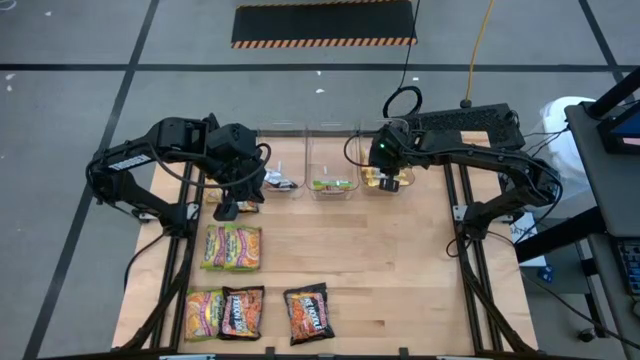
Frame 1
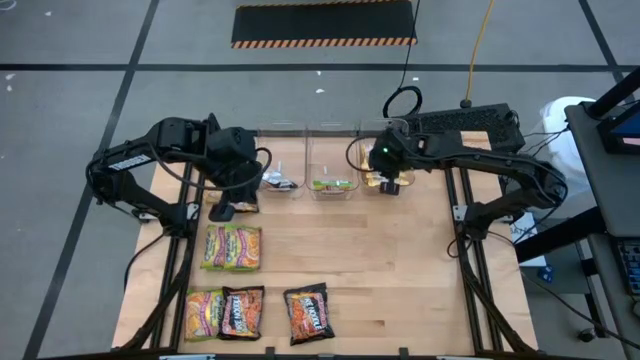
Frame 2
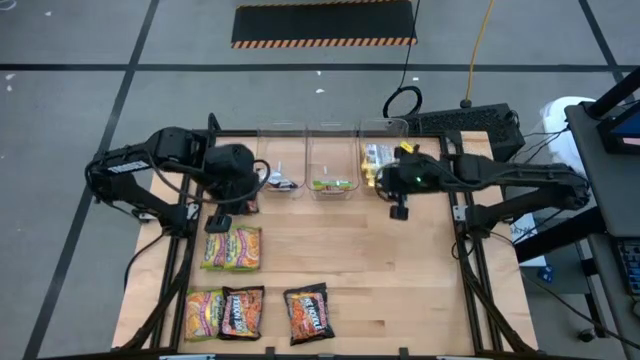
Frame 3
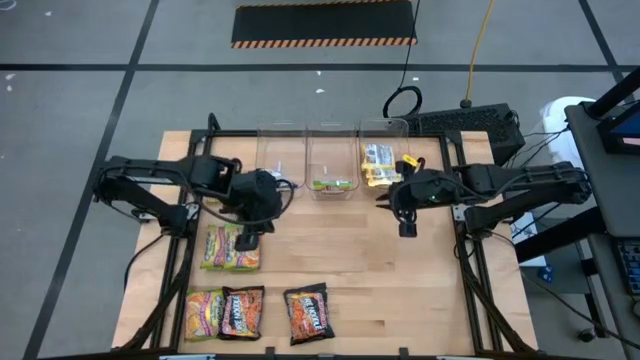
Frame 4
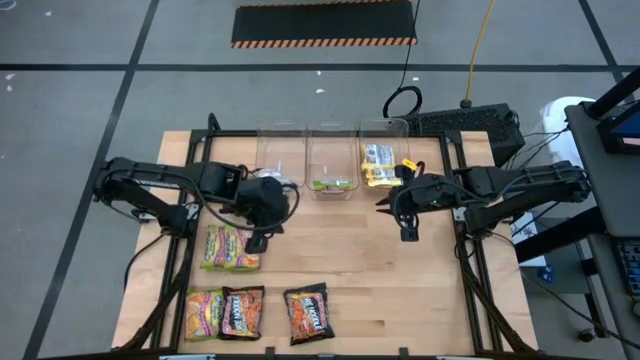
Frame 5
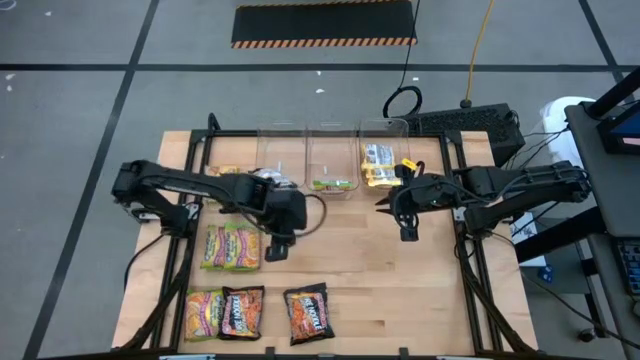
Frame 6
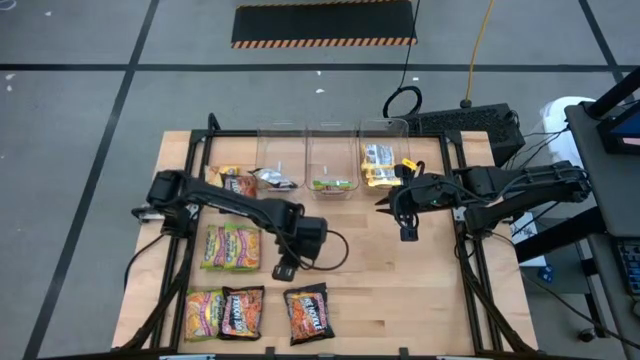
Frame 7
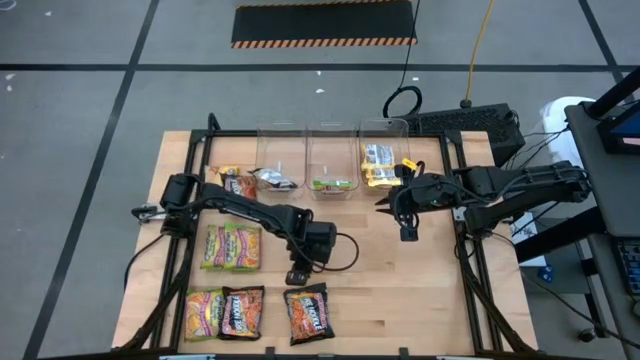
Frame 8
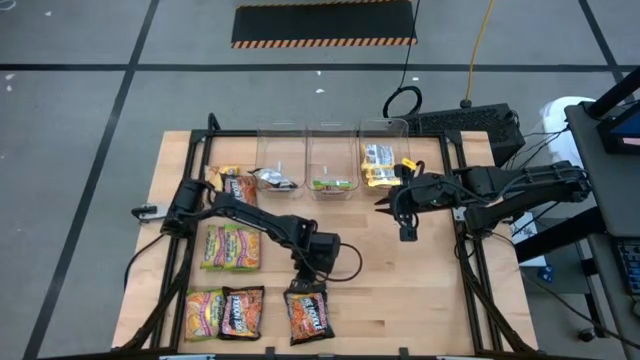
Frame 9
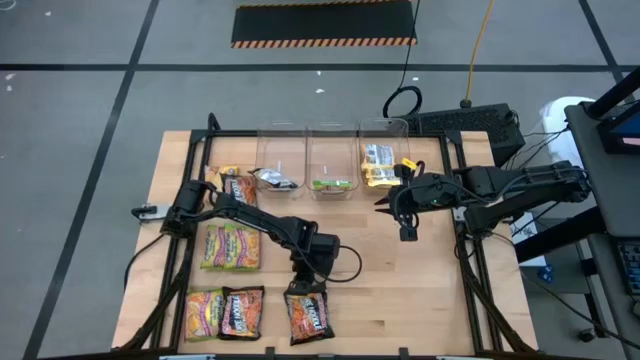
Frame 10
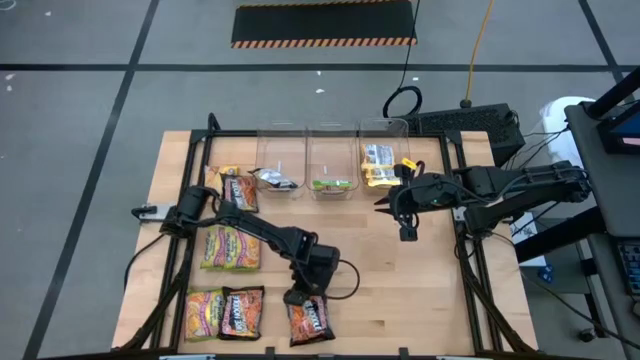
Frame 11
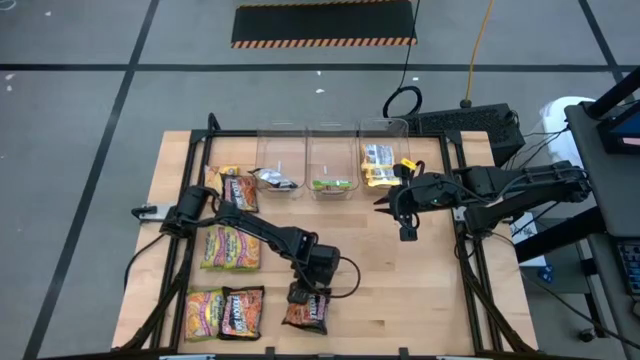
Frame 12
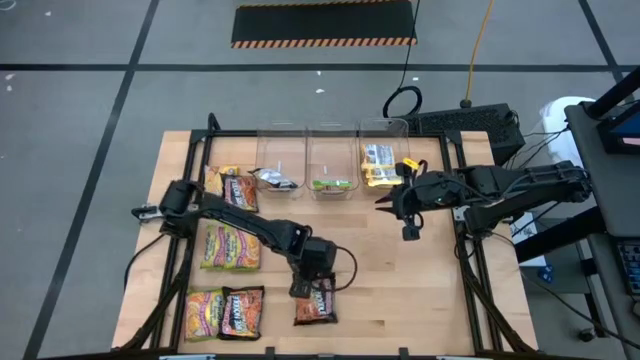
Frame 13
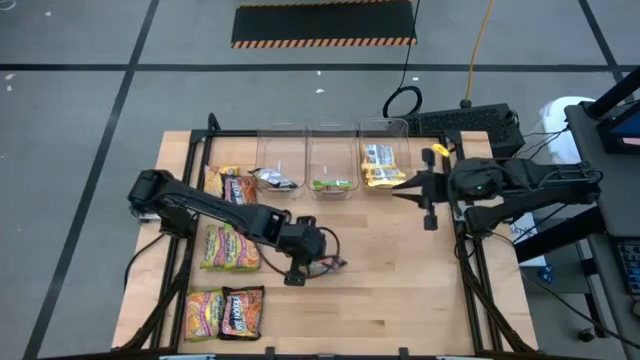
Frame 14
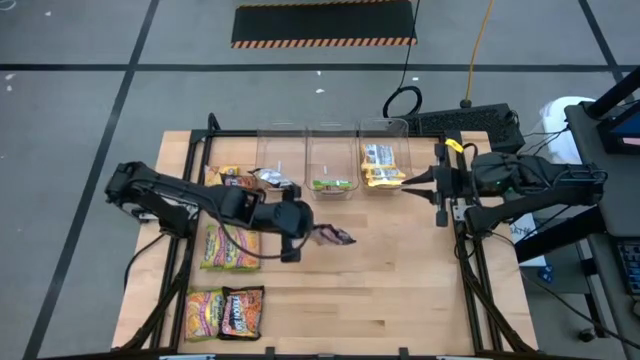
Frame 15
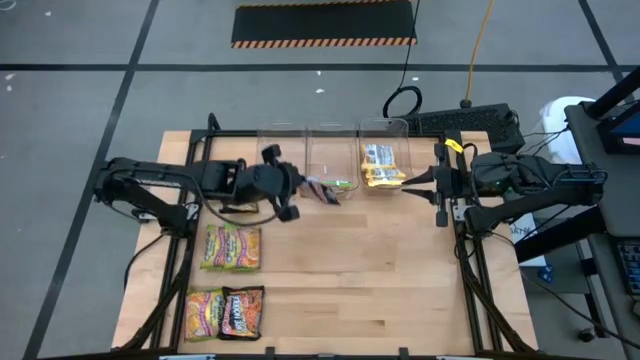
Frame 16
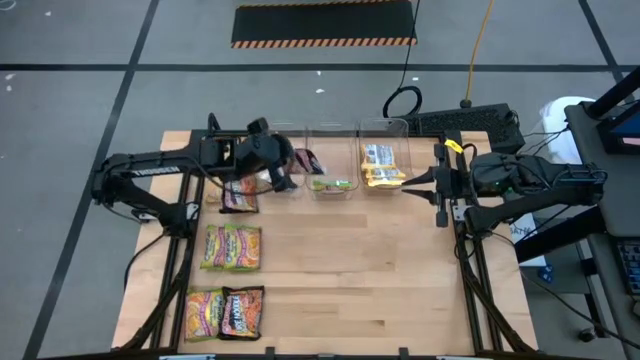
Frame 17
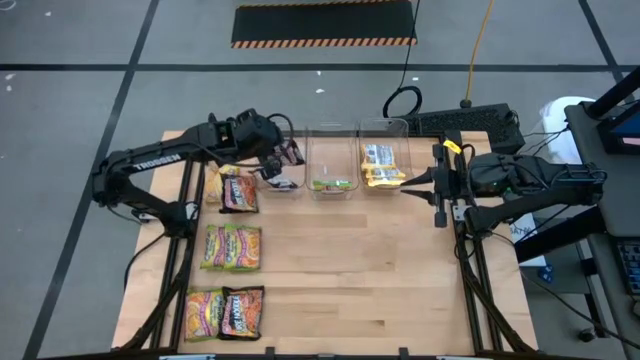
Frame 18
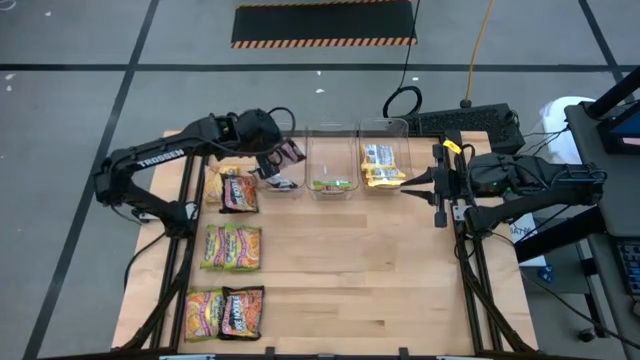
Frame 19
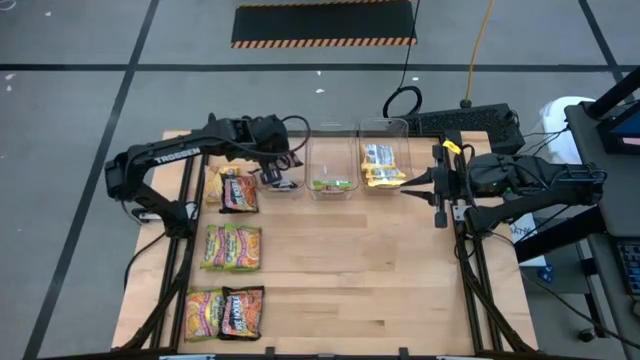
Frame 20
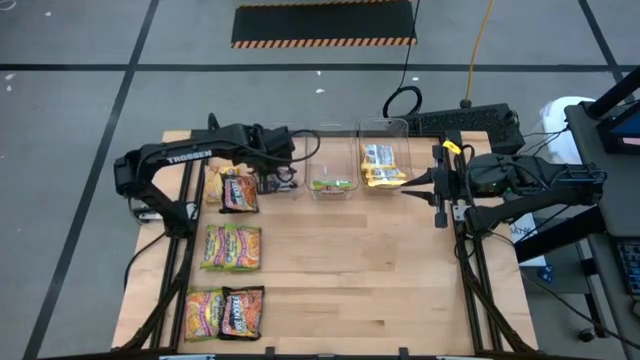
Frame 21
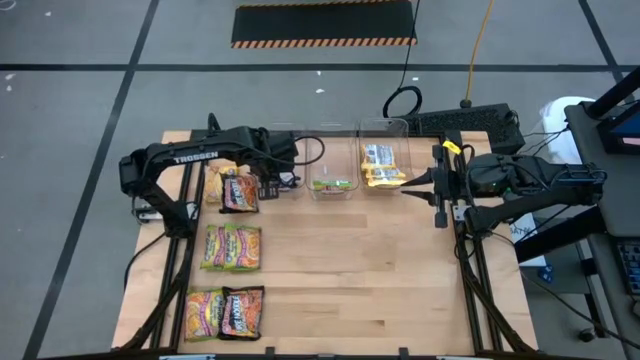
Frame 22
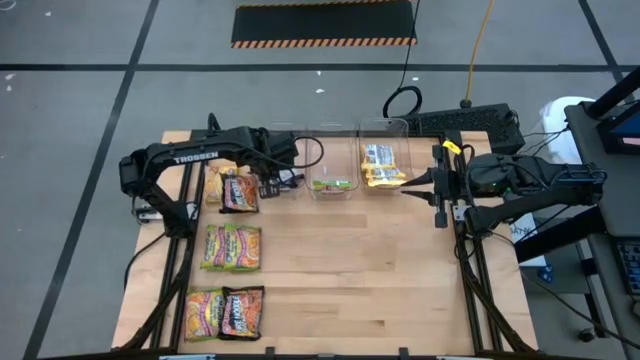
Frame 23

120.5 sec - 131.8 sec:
Task: Sort Maruchan noodles
Put the black noodle pack into the left transparent bin

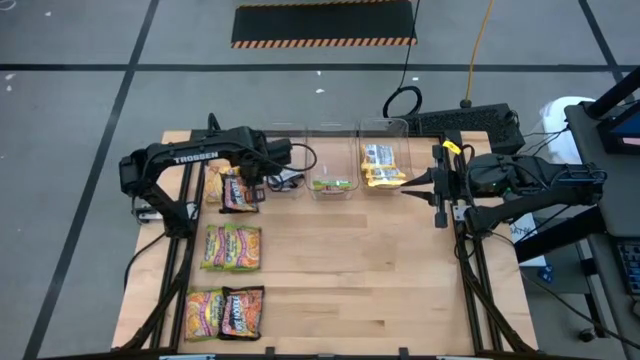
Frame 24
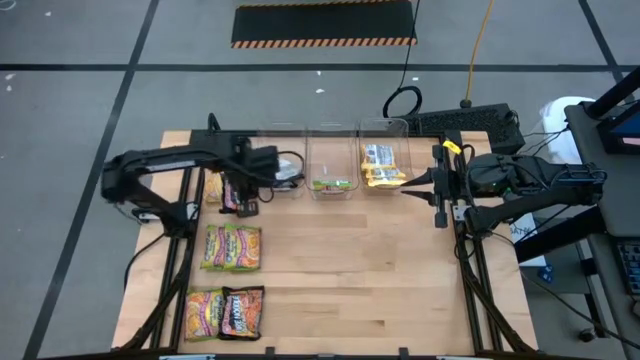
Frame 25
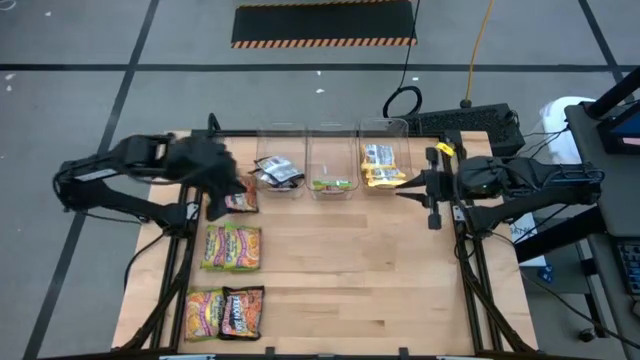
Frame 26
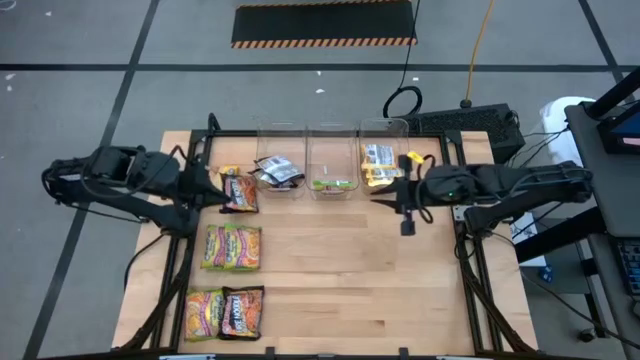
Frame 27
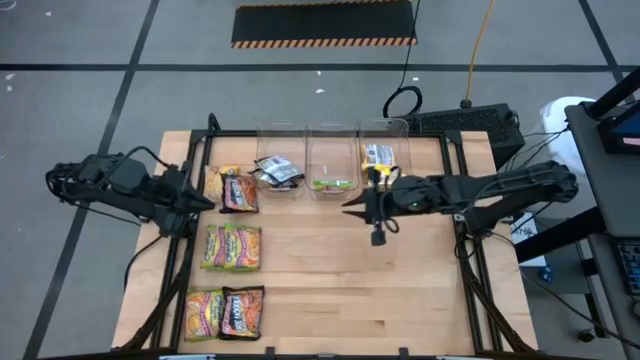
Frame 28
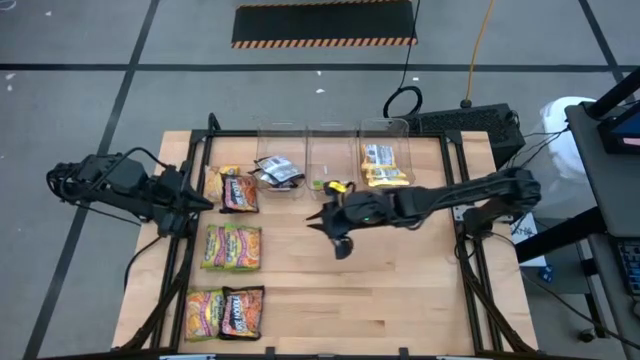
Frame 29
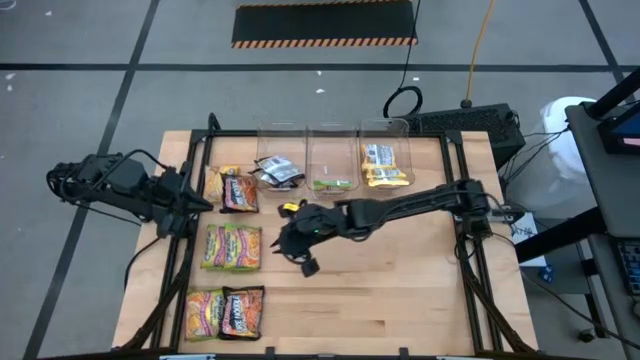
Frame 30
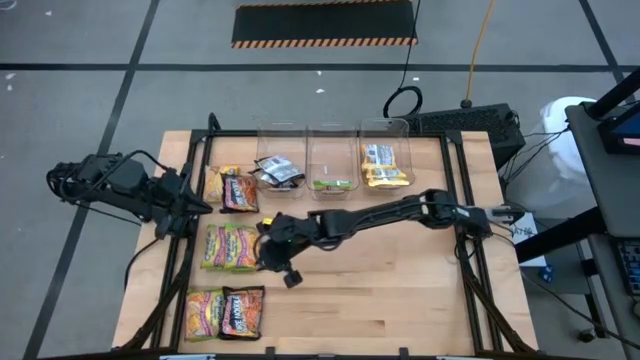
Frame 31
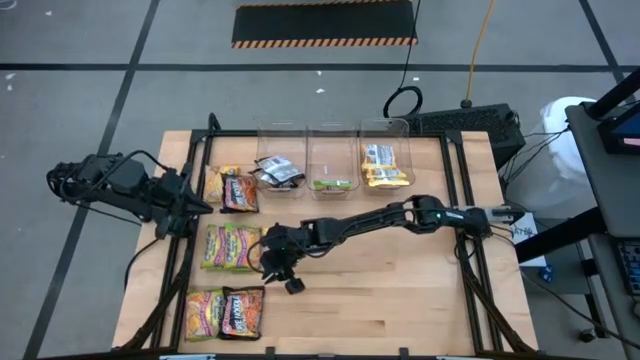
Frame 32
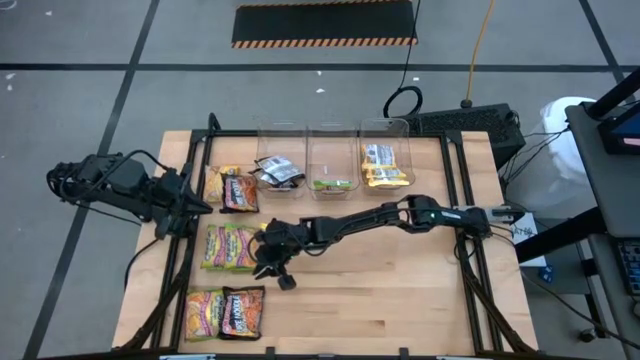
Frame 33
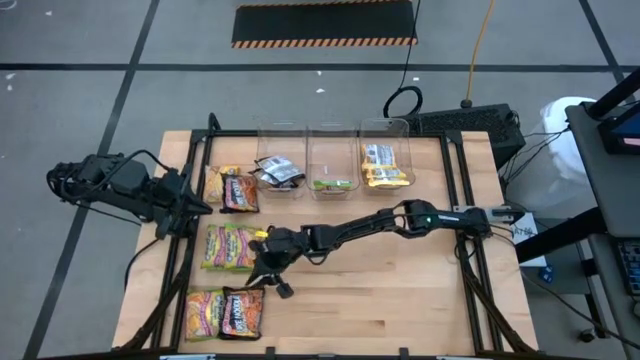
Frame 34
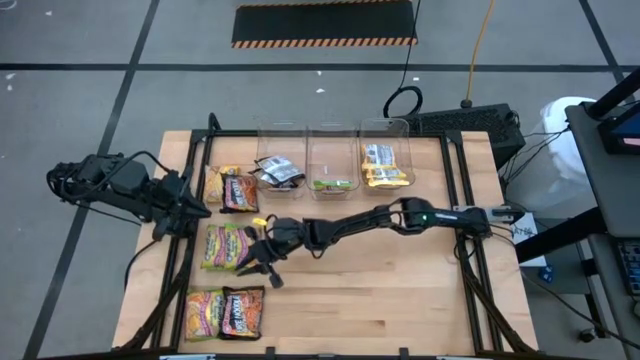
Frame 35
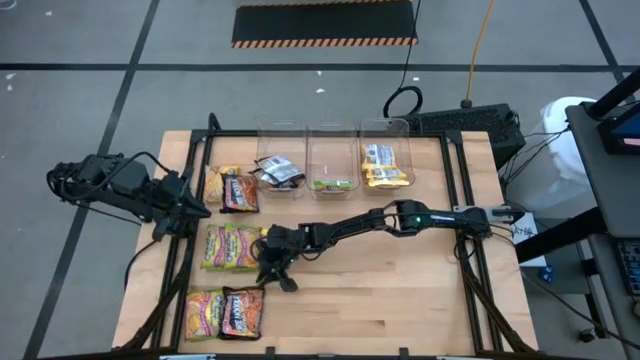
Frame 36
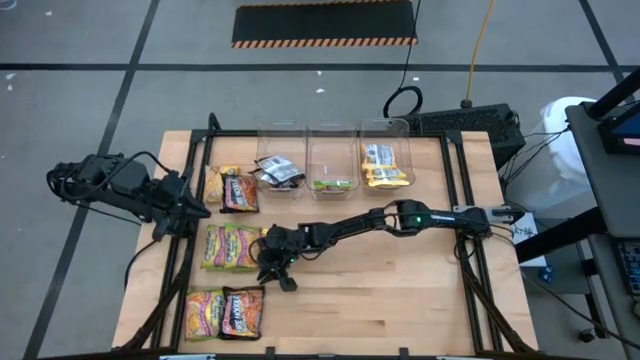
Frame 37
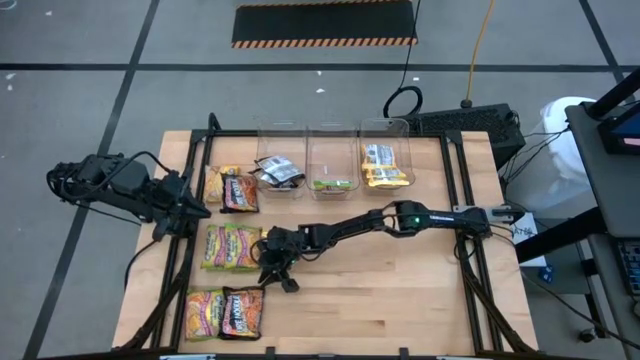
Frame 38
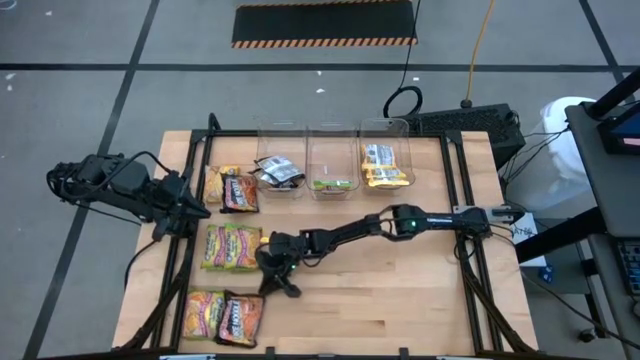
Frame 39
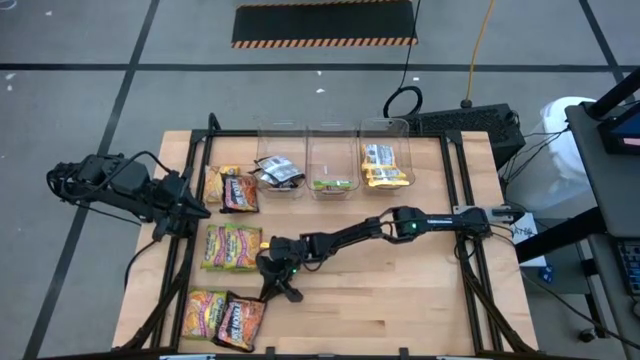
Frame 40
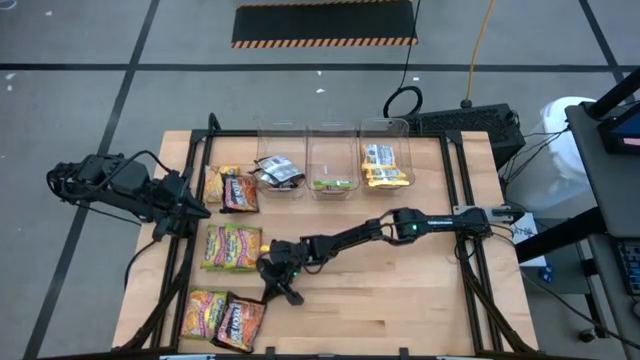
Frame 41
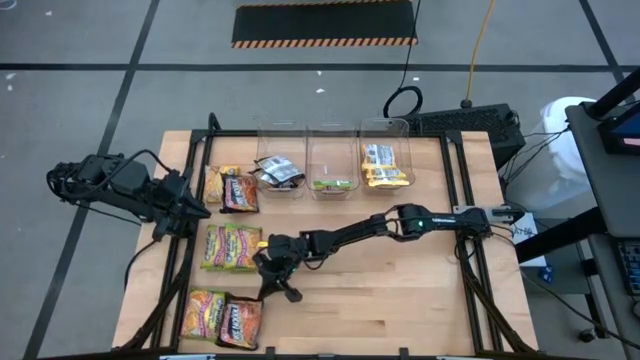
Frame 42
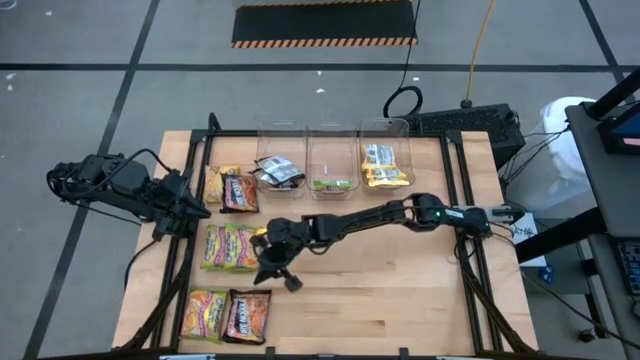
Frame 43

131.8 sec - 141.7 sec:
Put the black noodle pack into the left transparent bin
